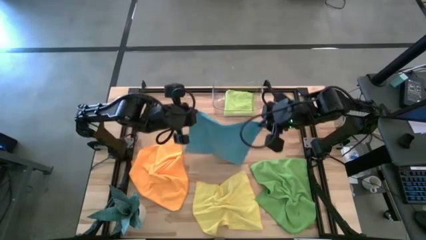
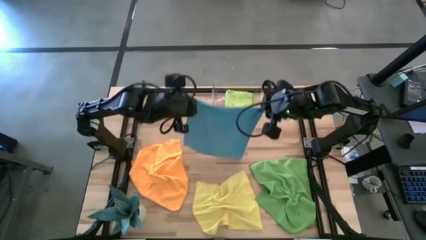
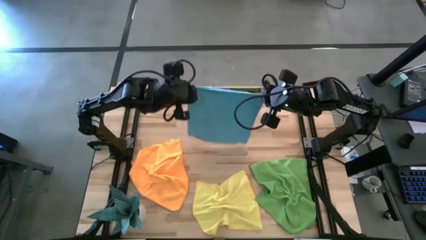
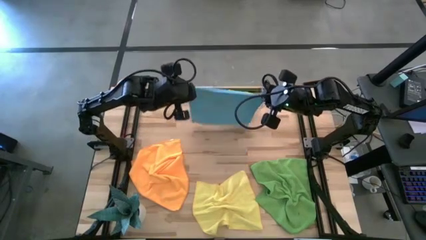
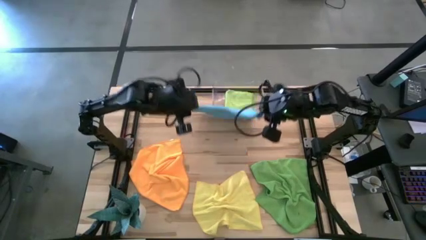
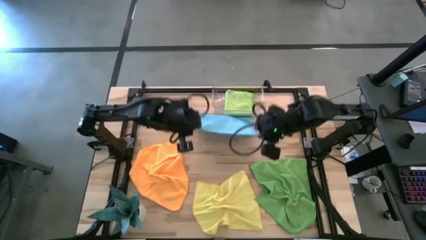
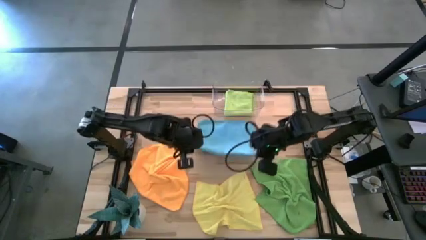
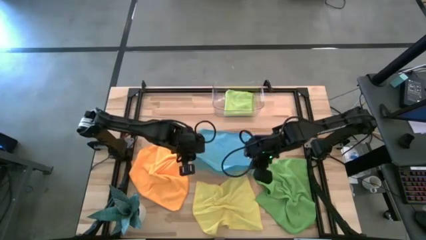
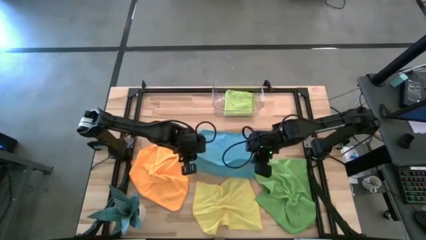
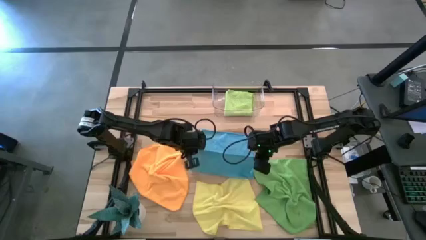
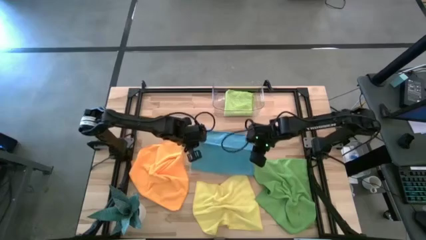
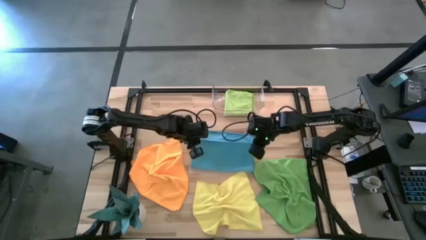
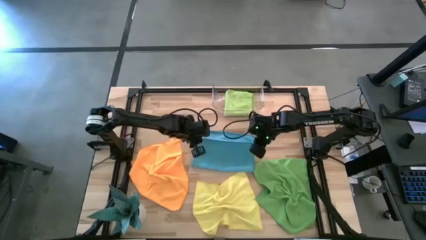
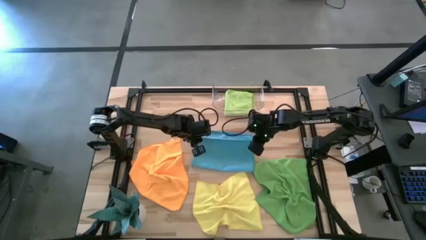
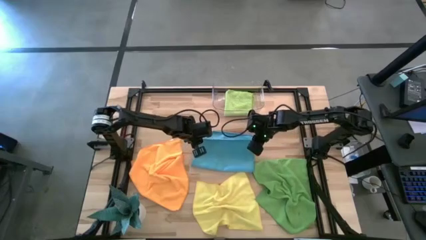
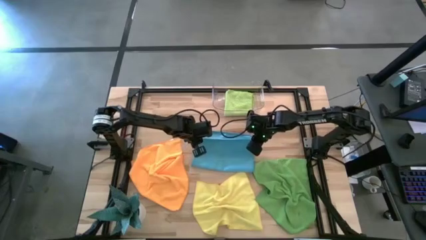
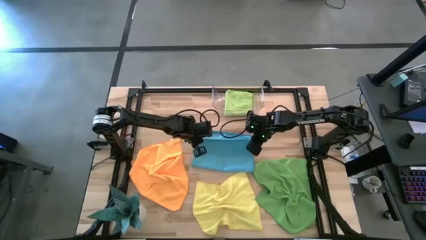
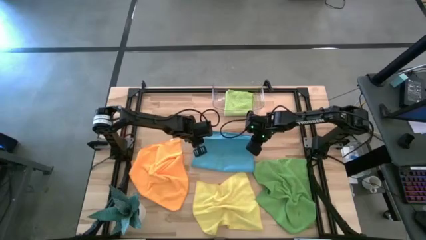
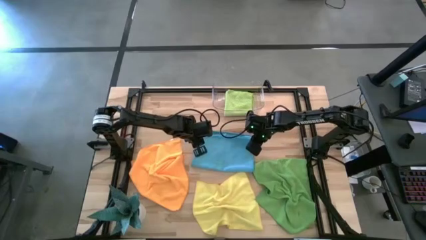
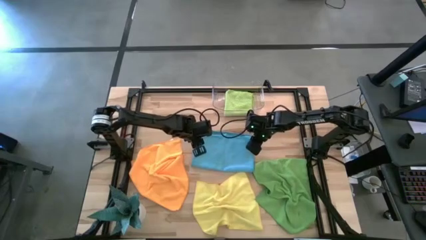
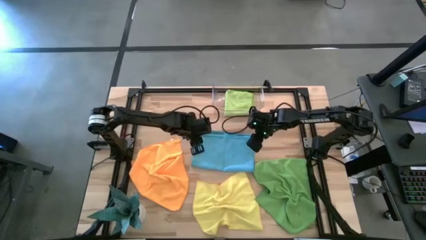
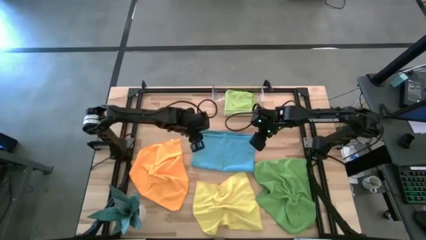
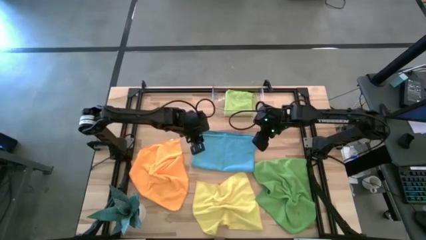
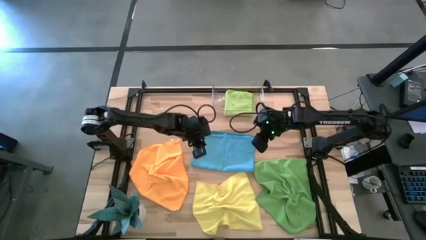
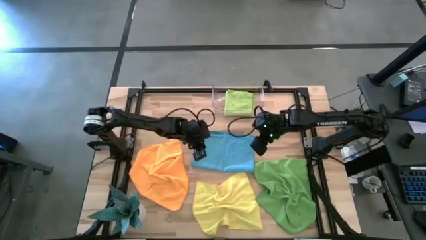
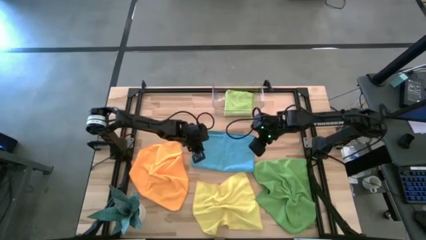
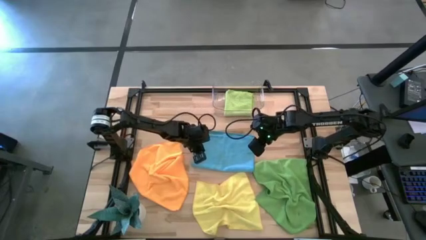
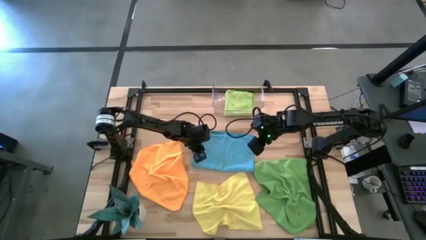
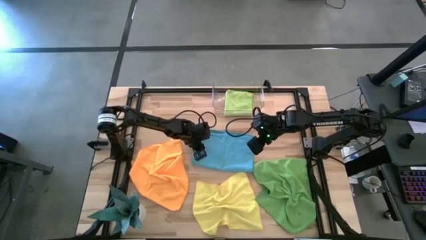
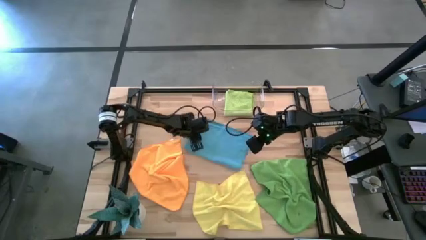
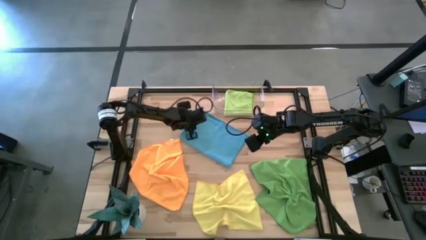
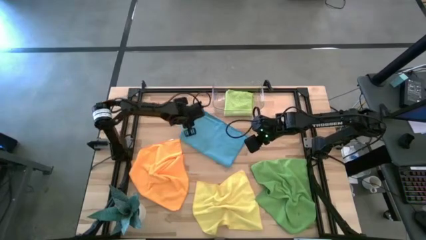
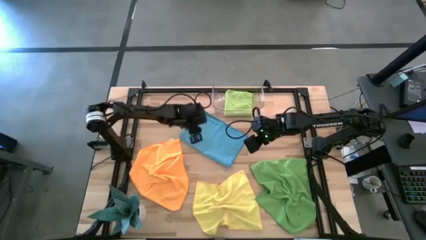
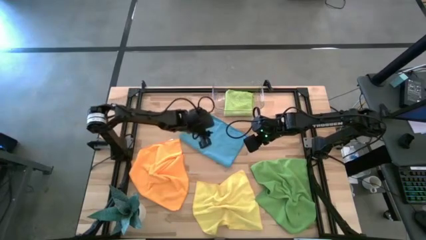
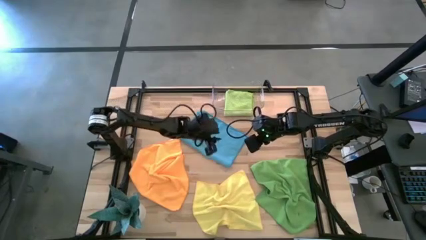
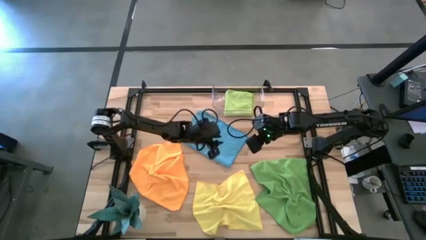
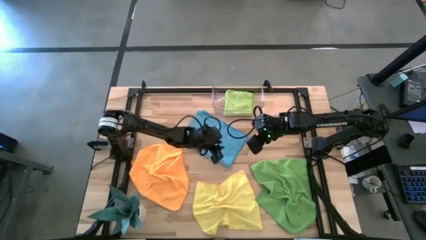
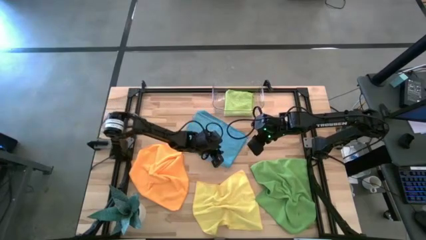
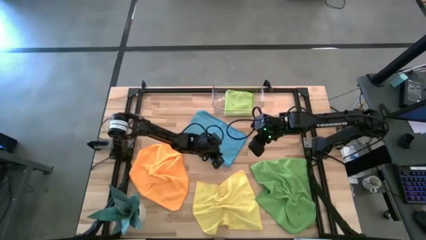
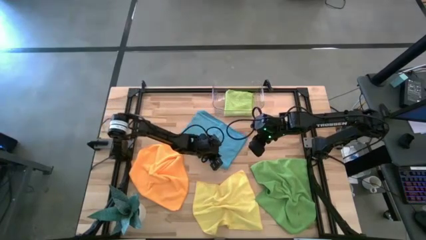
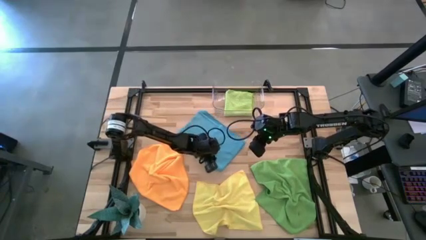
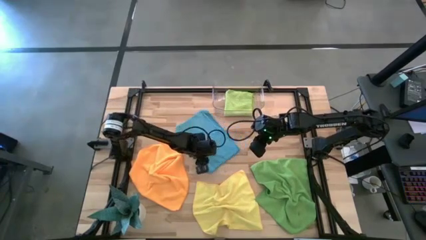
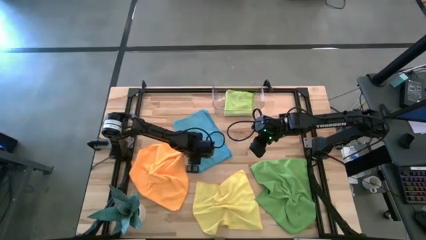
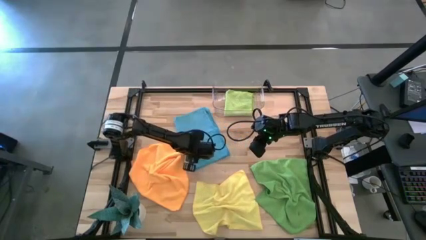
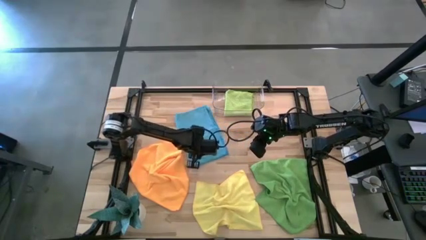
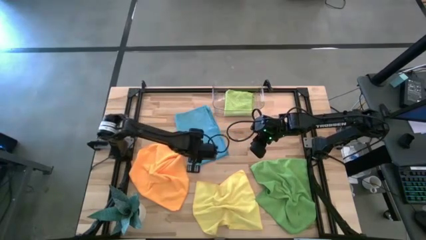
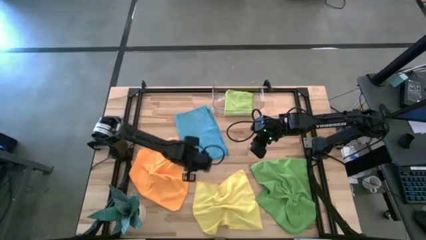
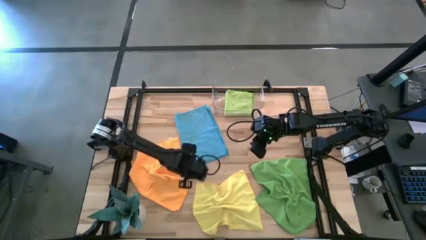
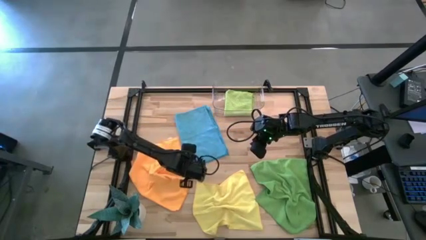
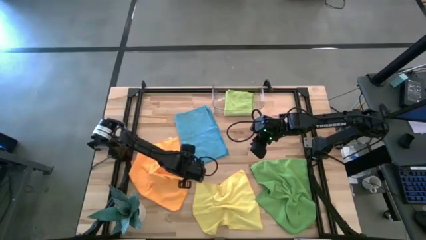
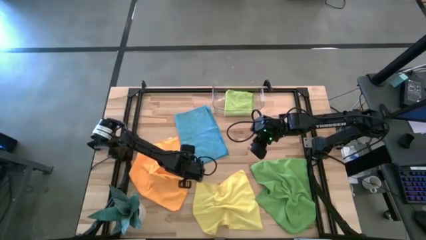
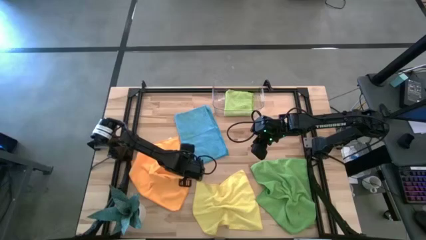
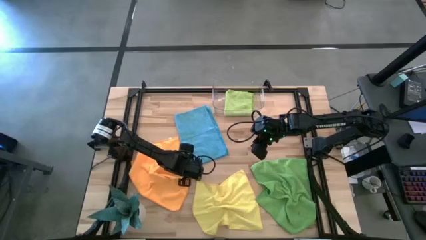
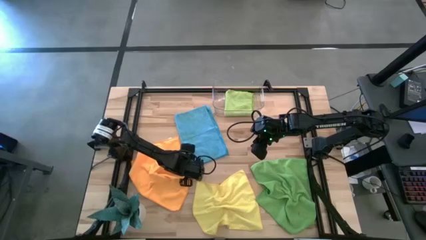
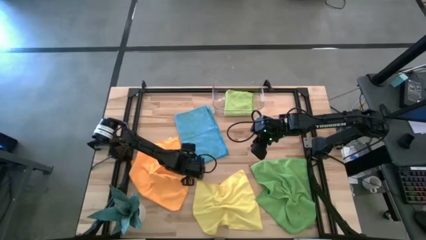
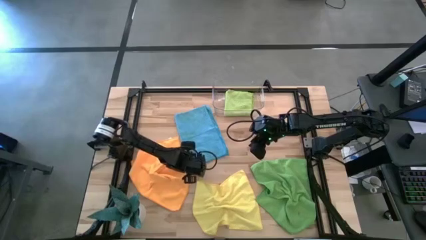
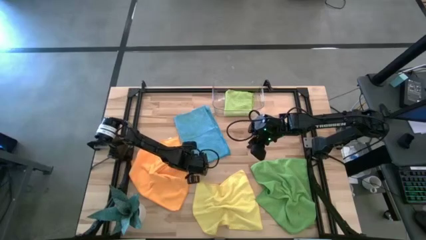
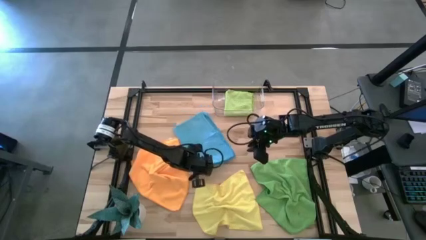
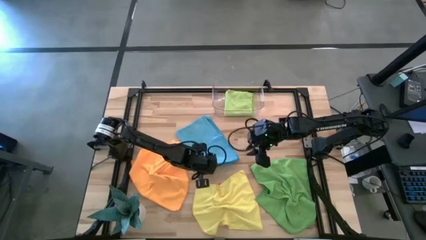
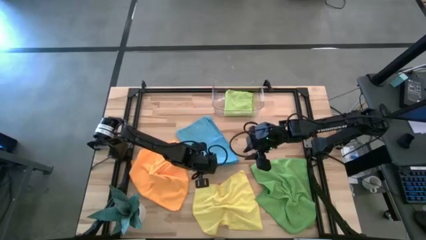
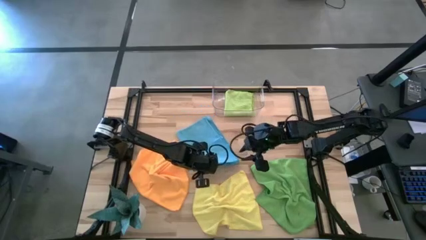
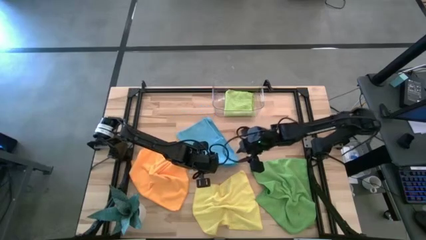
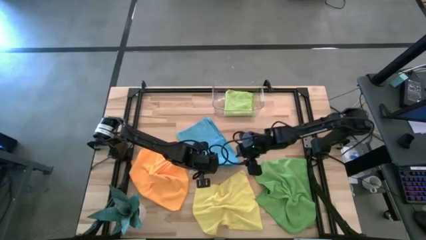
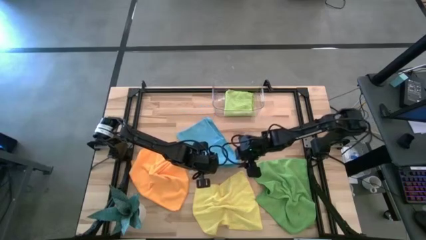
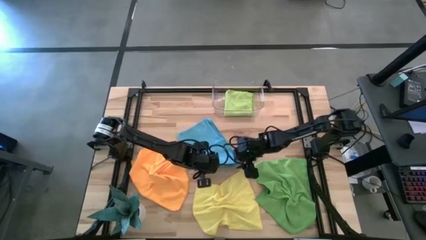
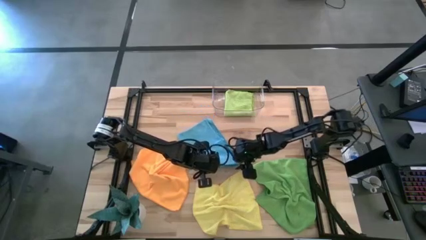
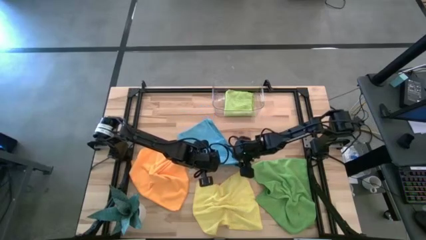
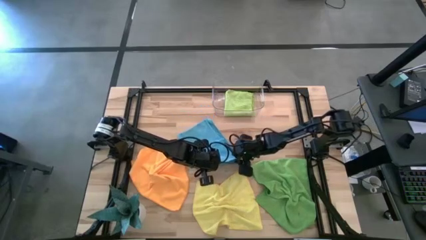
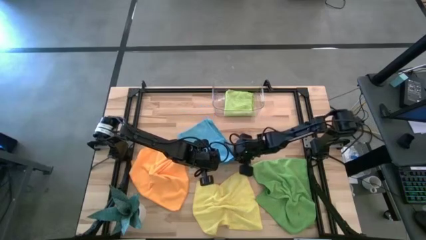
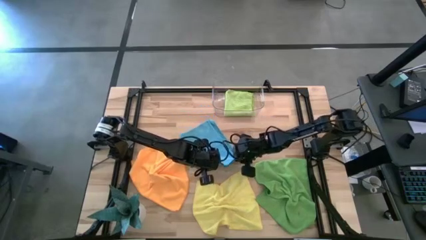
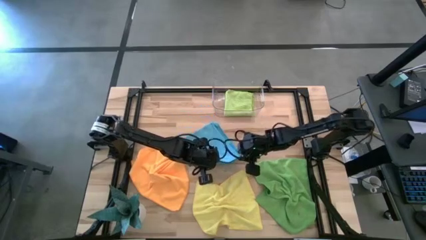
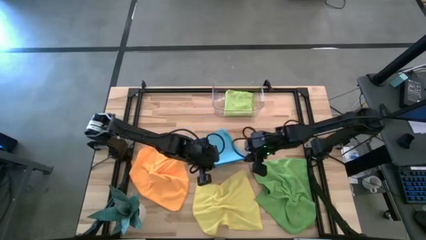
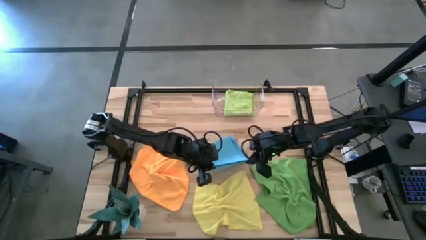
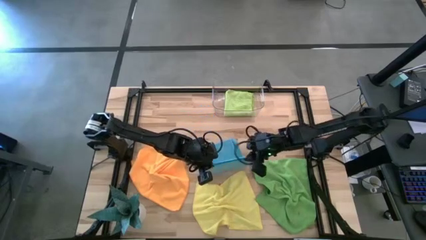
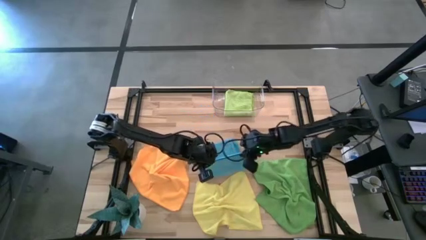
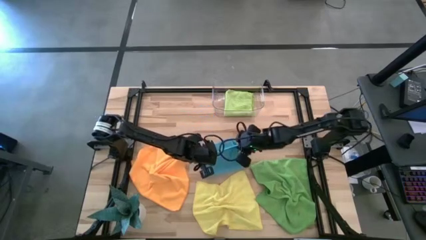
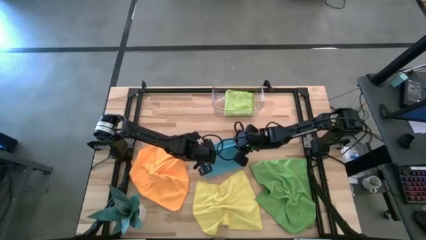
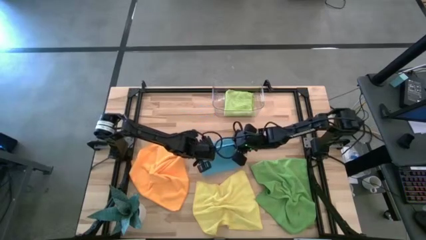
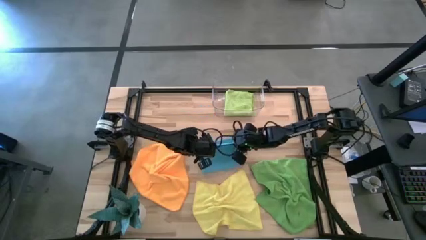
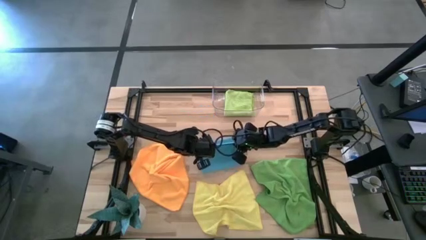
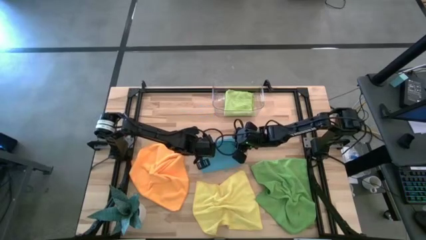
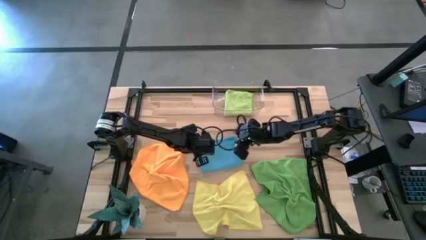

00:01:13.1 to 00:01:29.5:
Task: Fold microfiber towels
Fold the blue microfiber cloth

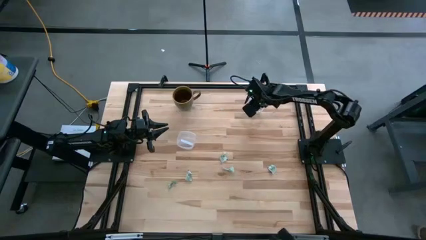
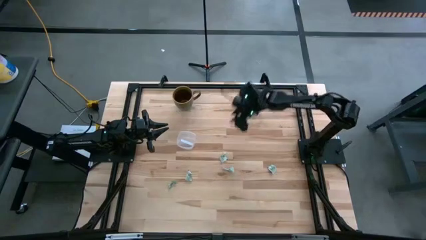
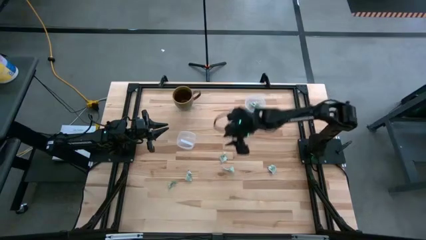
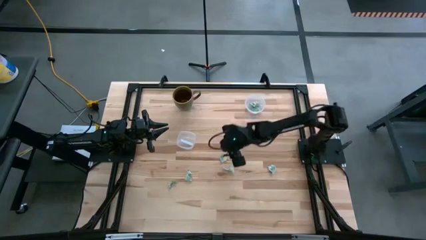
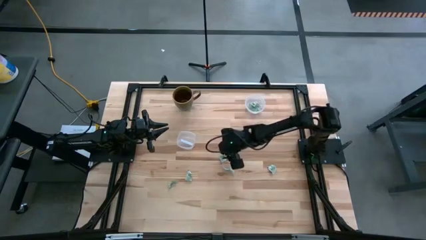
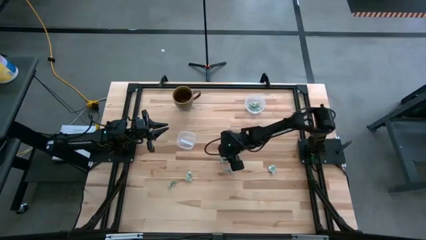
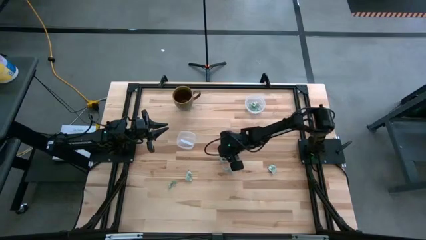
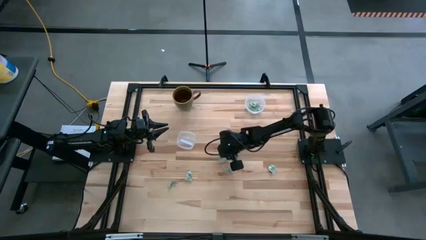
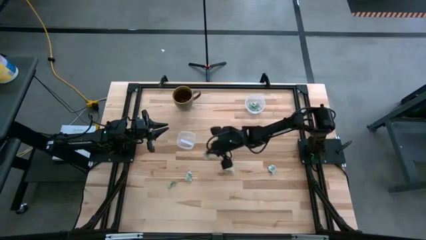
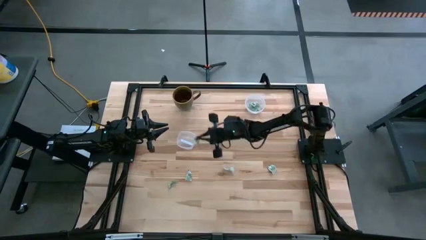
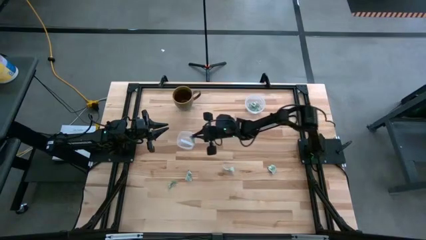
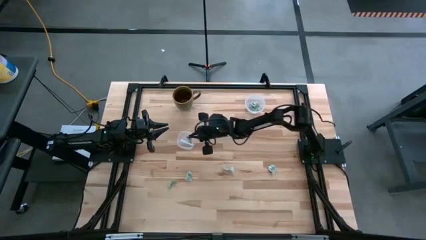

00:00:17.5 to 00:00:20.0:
Task: Pick and place Stevia / Truvia into bins
Put the stevia packet into the bottom container
